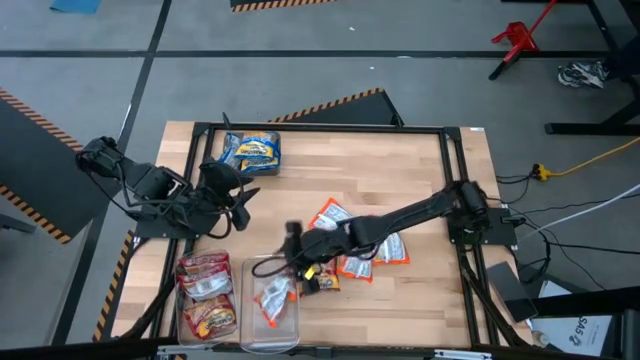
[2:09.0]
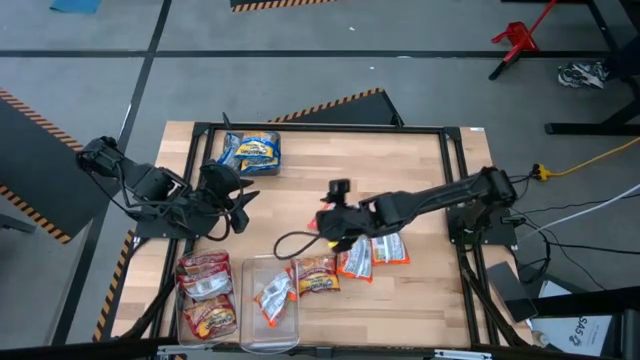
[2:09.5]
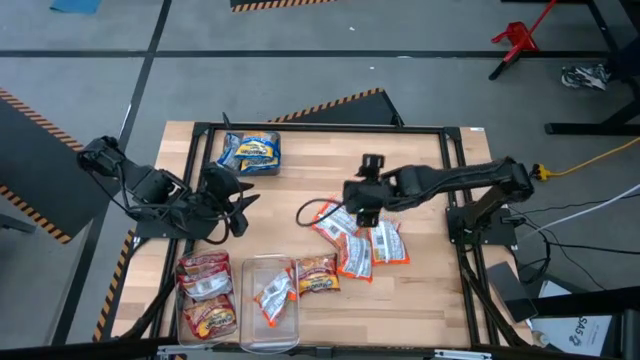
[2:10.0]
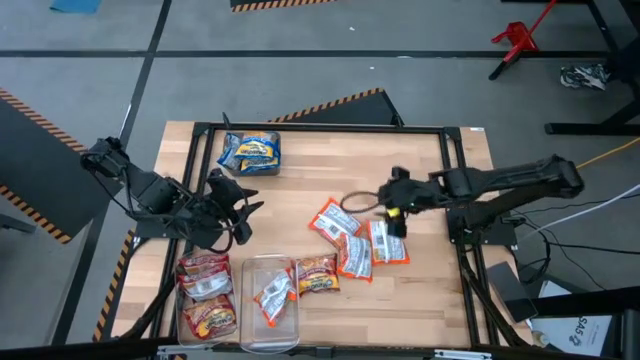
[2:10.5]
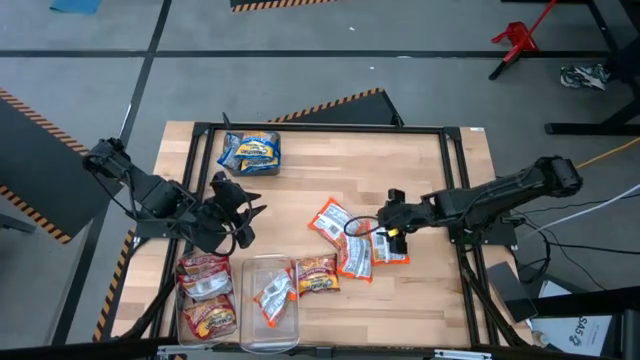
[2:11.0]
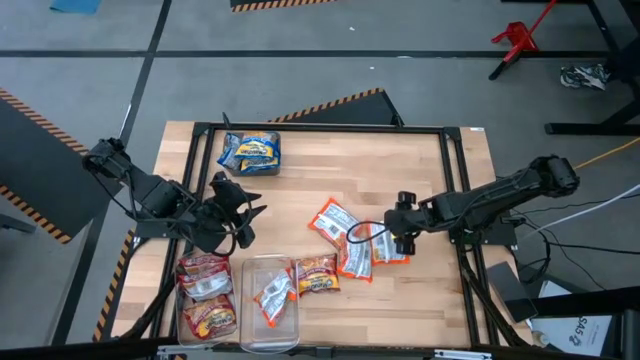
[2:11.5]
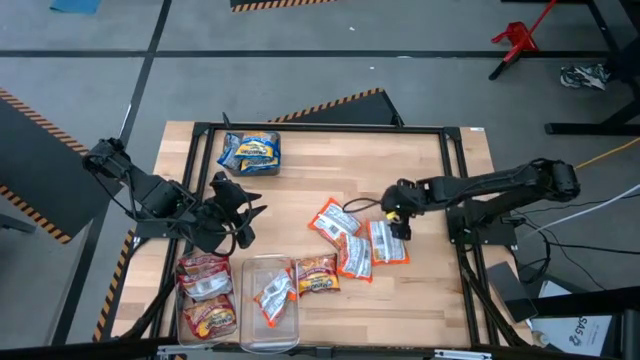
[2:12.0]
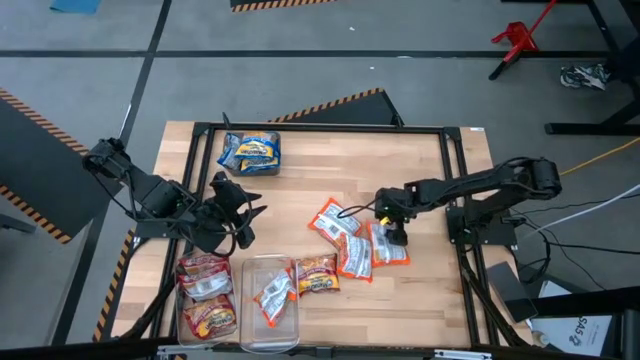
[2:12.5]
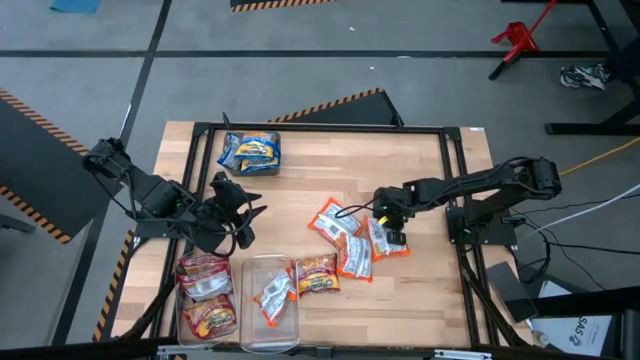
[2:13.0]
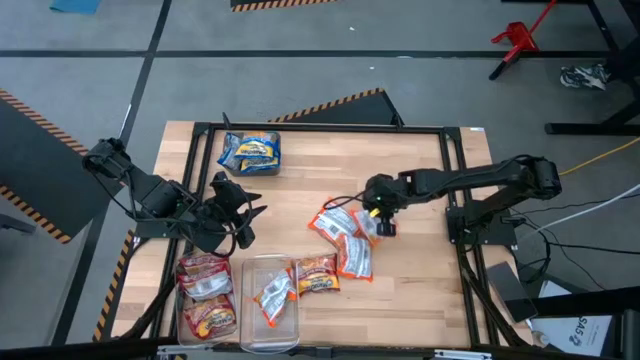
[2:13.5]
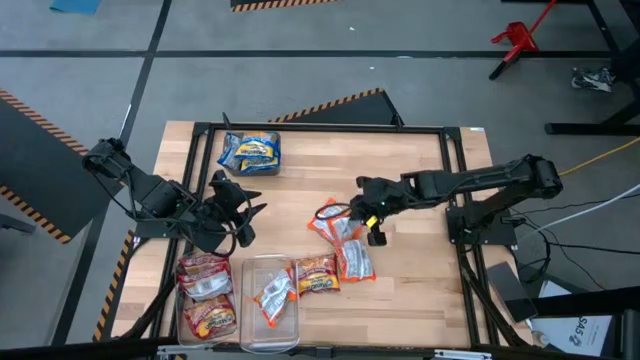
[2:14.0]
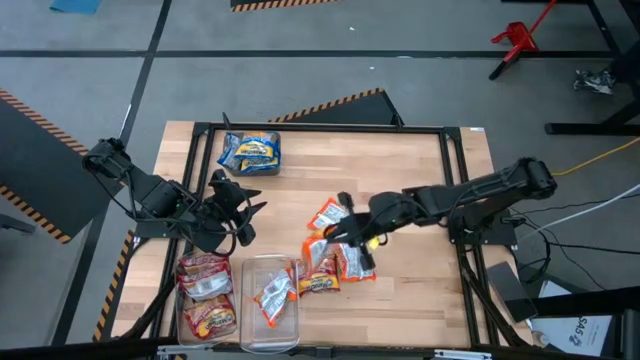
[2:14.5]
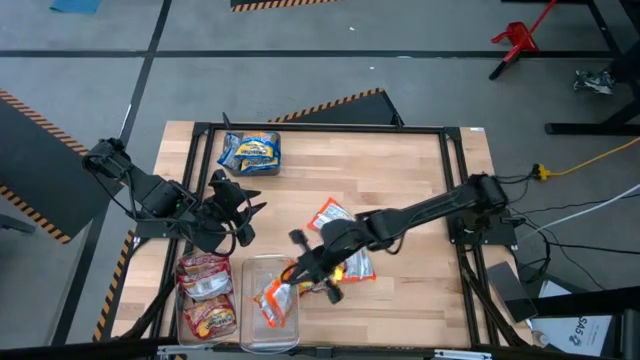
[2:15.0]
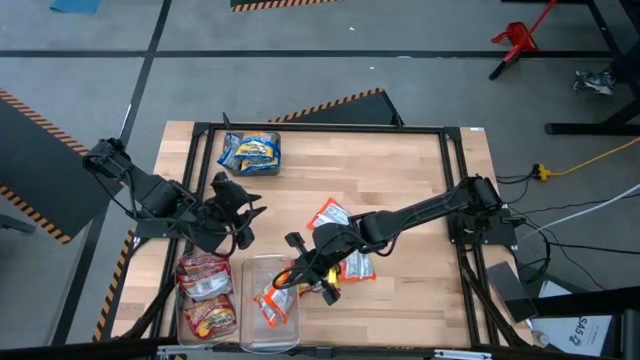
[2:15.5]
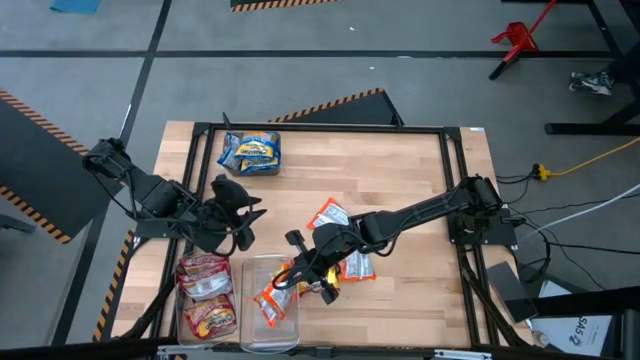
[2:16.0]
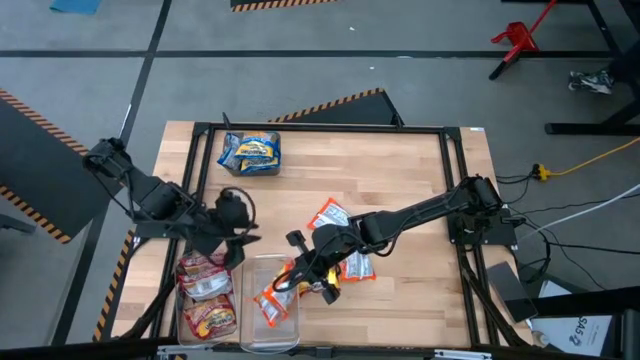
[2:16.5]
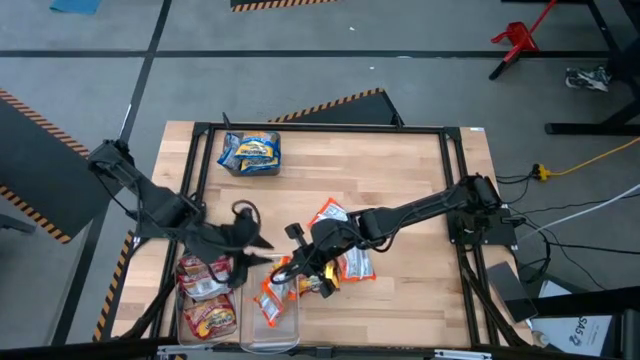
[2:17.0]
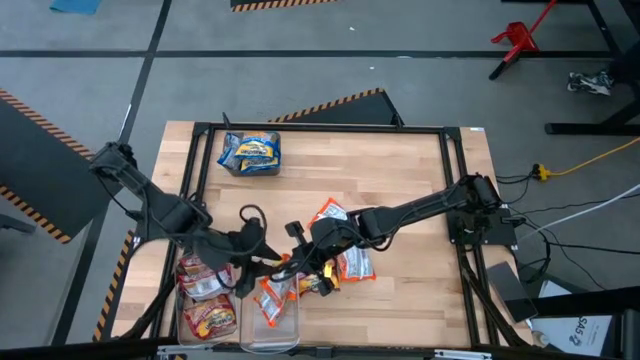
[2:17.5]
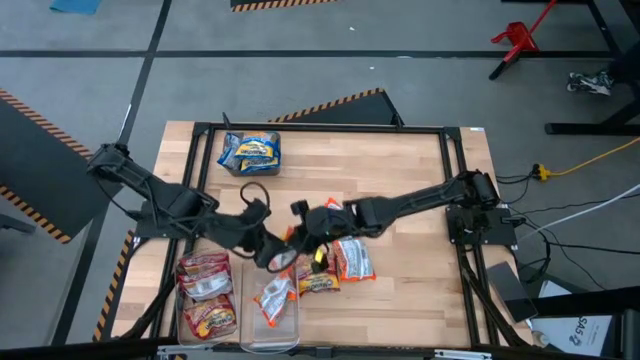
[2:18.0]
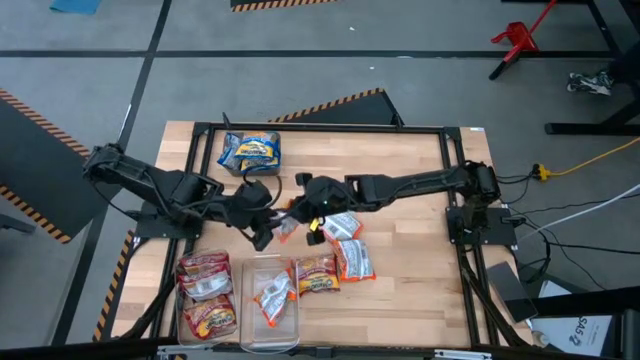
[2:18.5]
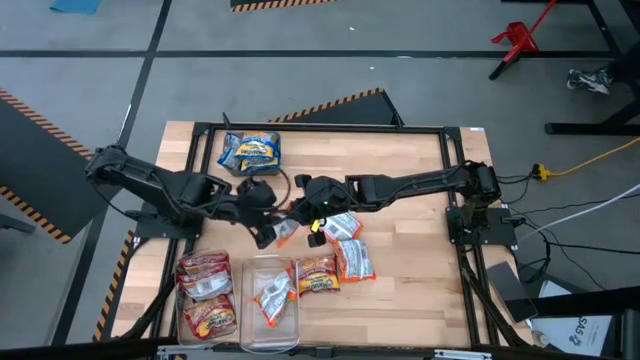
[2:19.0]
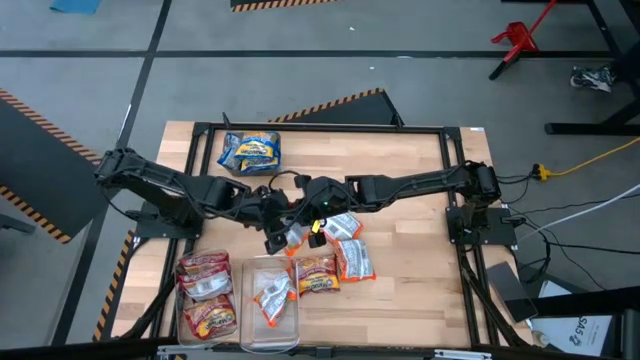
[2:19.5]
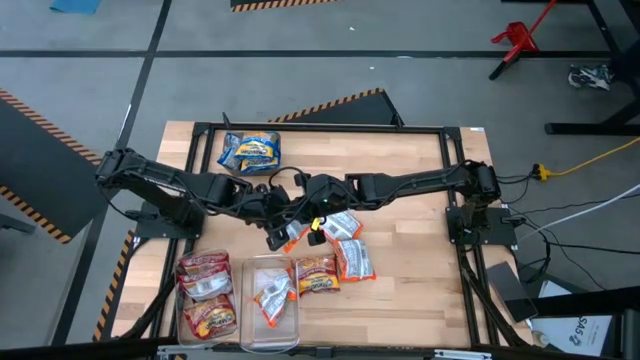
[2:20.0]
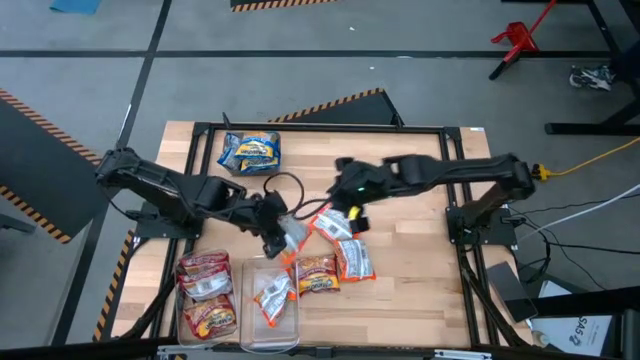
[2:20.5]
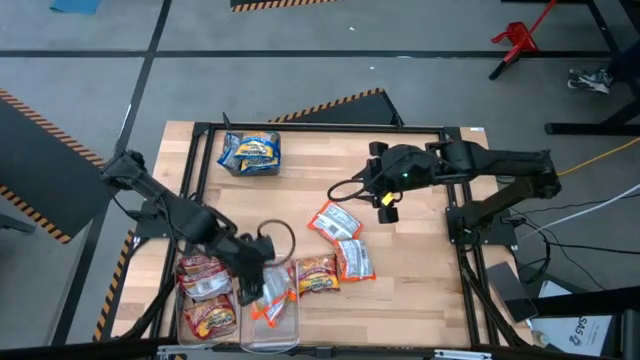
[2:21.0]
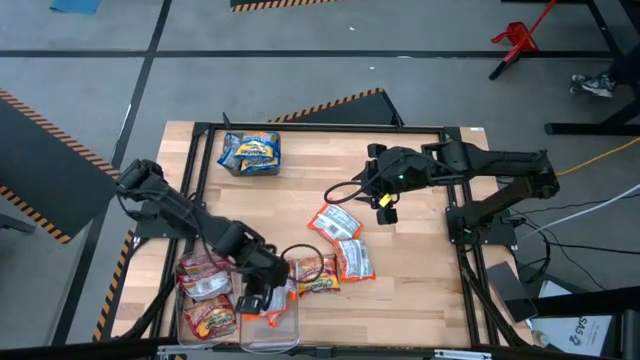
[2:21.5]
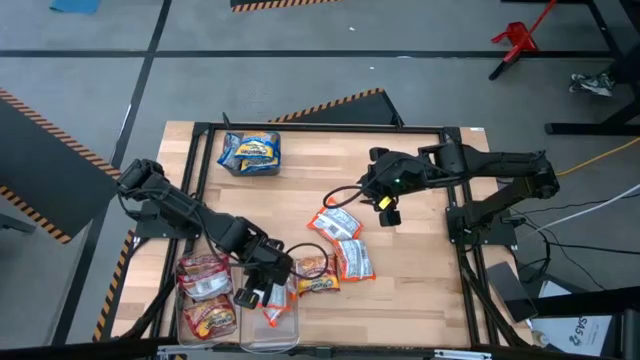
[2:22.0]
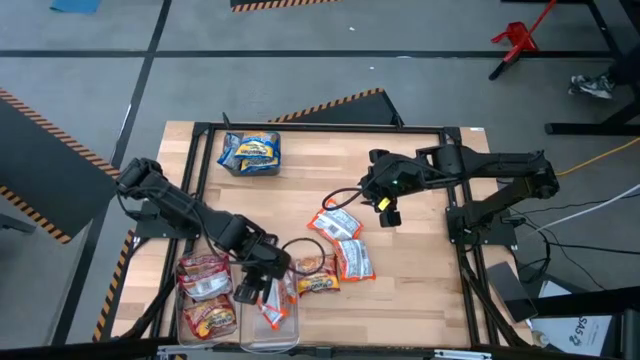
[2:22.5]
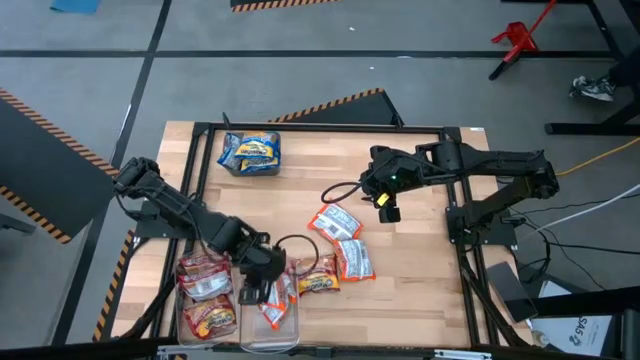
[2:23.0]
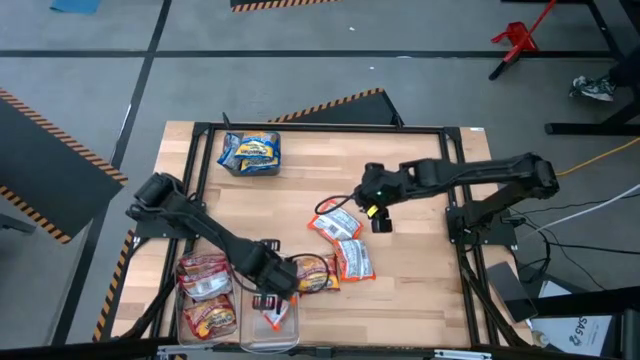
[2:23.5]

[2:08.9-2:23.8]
Task: Sort Maruchan noodles
Put the orange noodle pack into the right transparent bin

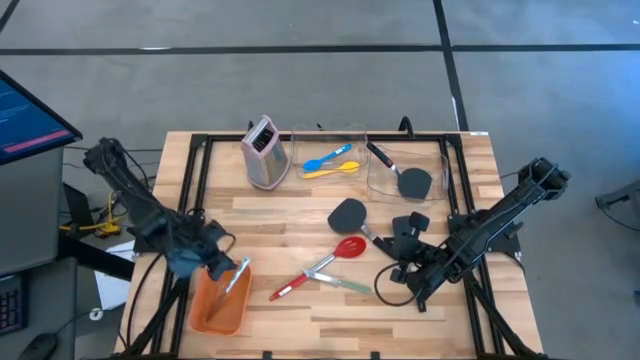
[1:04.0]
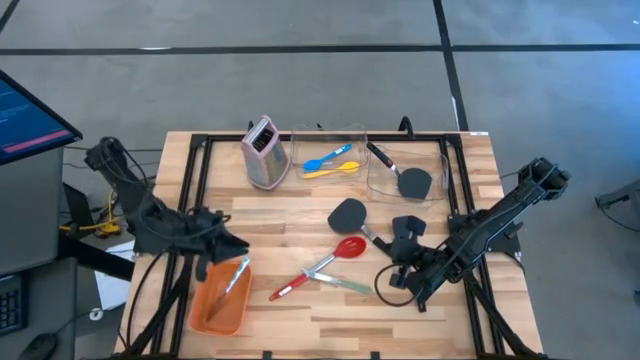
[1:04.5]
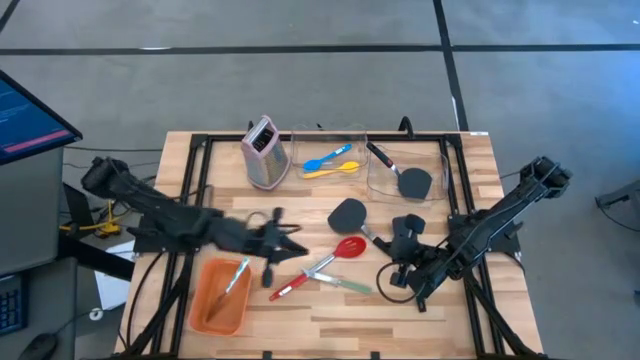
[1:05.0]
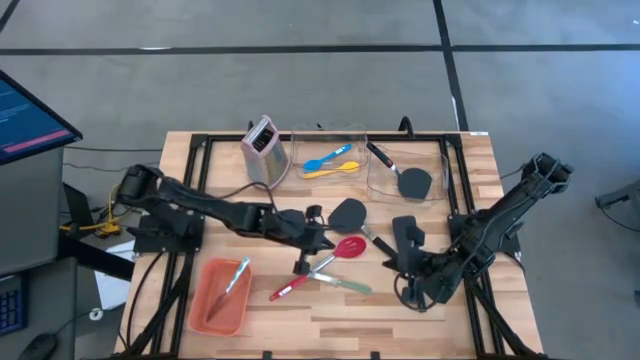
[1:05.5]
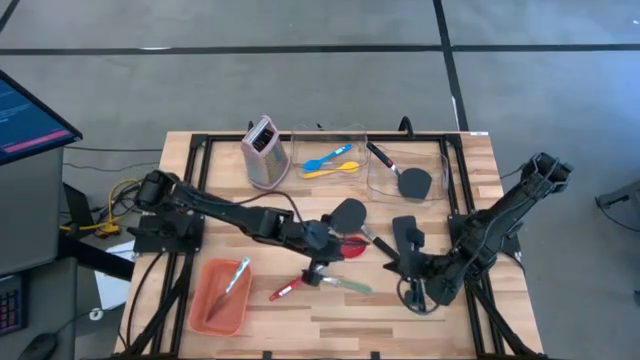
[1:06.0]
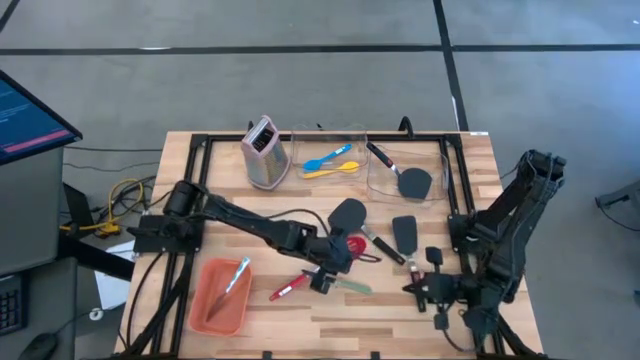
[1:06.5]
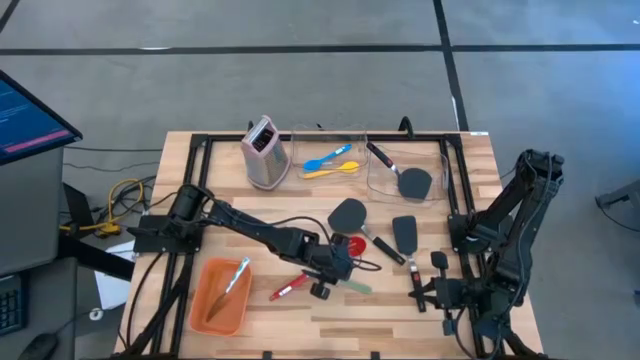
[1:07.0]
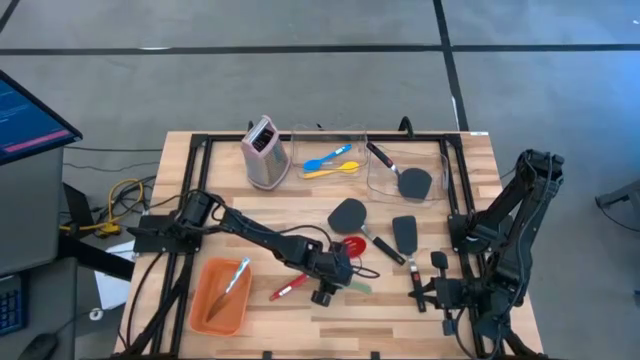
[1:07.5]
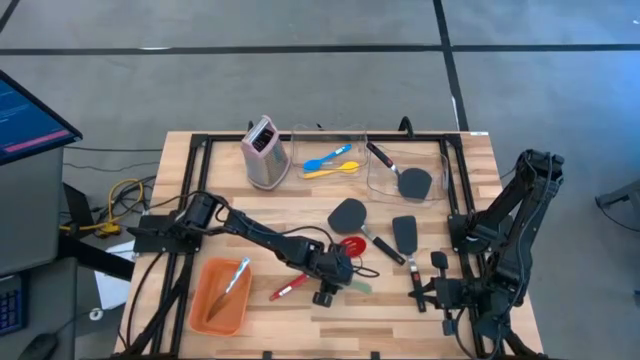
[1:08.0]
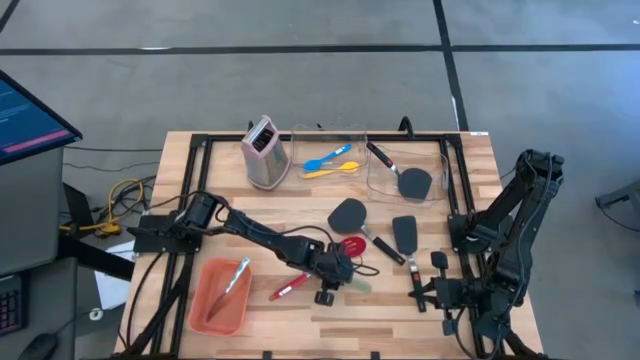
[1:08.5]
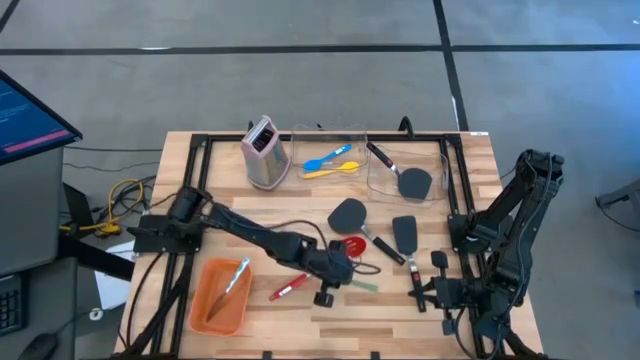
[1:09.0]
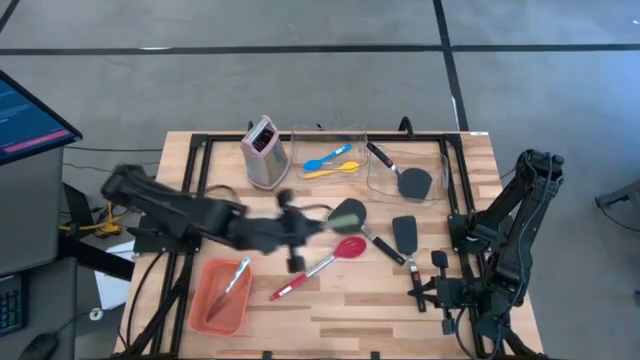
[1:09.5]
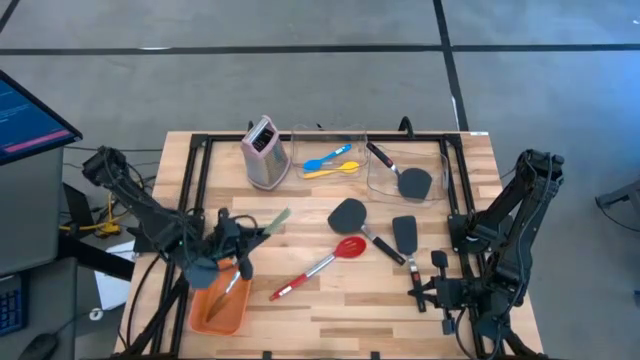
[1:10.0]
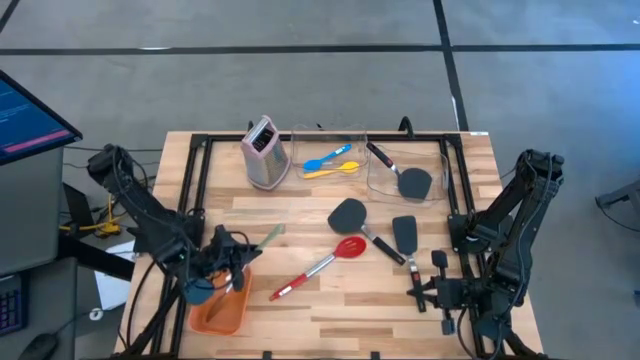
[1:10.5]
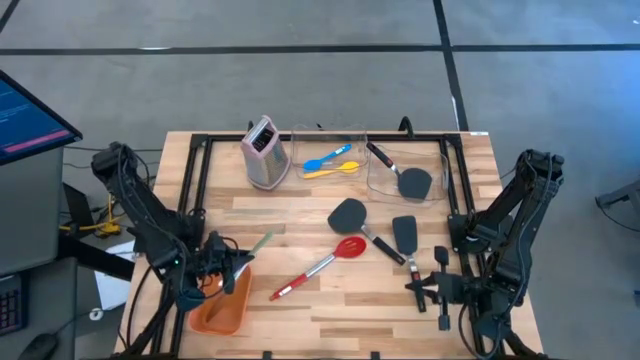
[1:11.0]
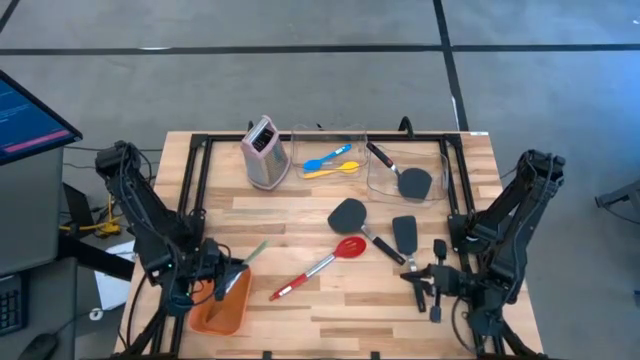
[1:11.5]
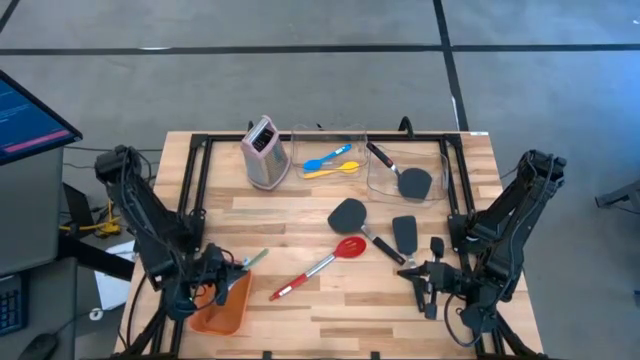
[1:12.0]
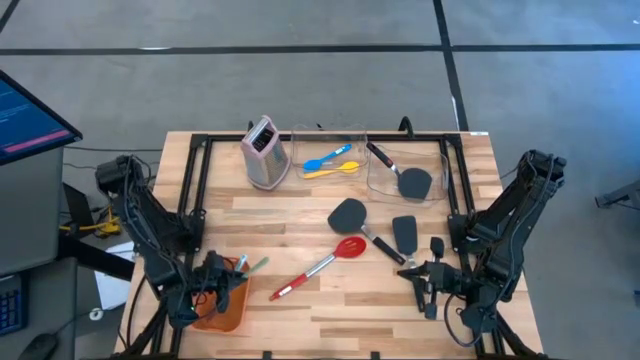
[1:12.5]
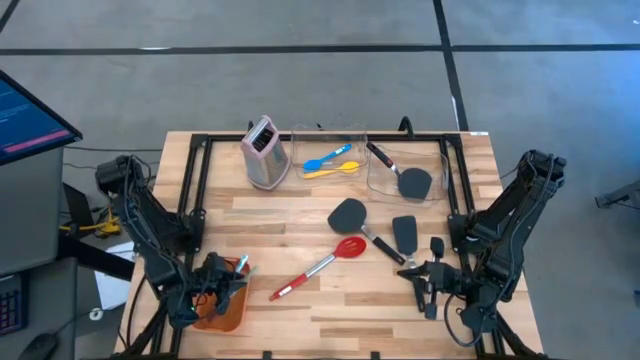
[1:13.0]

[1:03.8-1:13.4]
Task: Pick & Place Kitchen Items
Put the green knife in the orange bin
